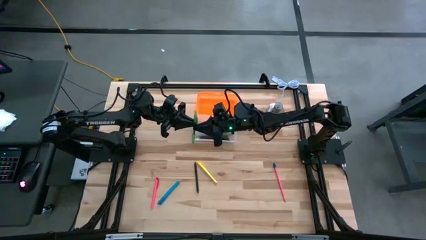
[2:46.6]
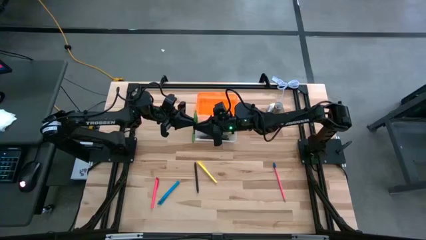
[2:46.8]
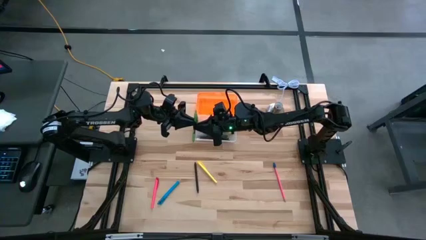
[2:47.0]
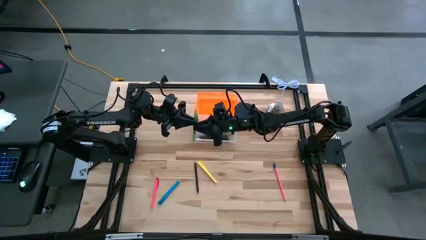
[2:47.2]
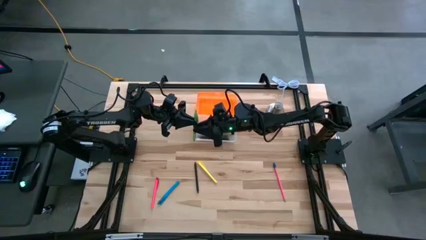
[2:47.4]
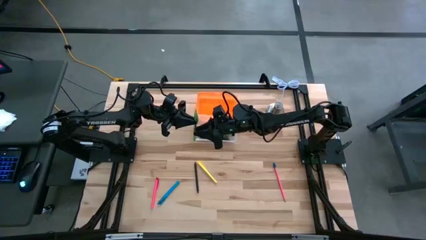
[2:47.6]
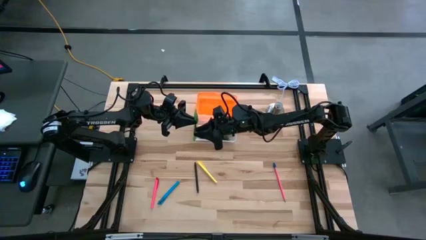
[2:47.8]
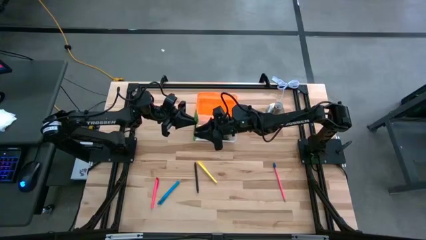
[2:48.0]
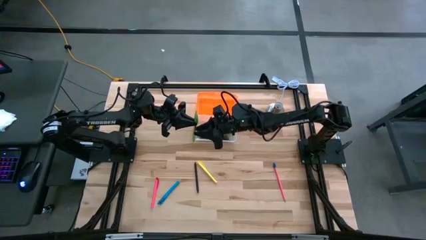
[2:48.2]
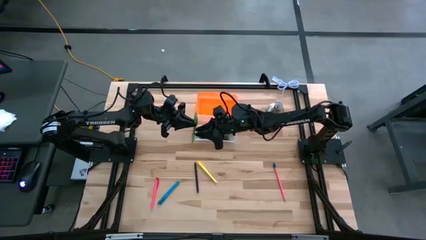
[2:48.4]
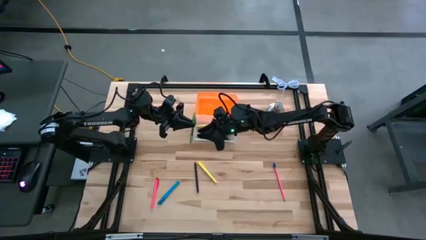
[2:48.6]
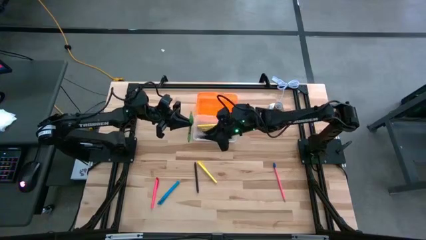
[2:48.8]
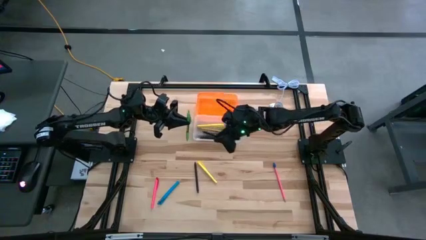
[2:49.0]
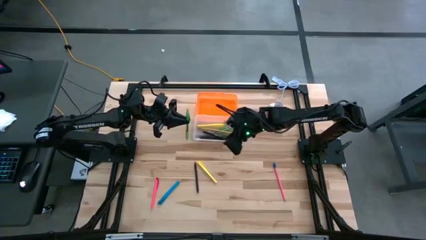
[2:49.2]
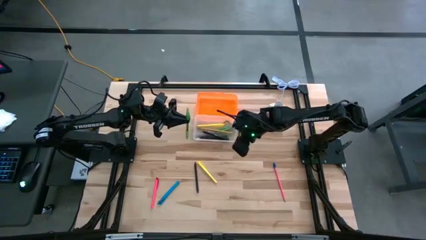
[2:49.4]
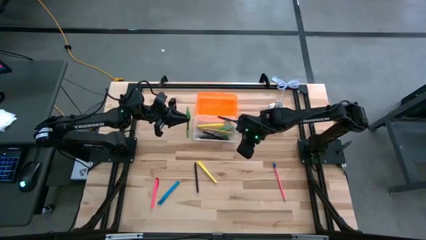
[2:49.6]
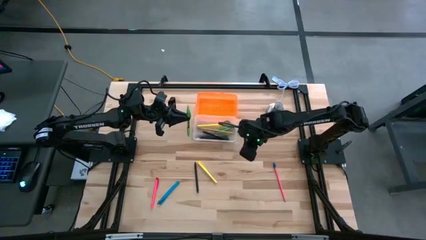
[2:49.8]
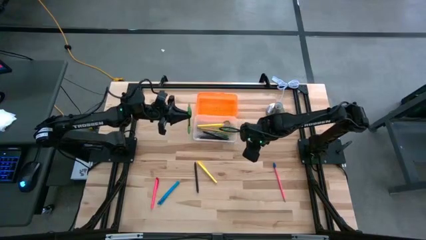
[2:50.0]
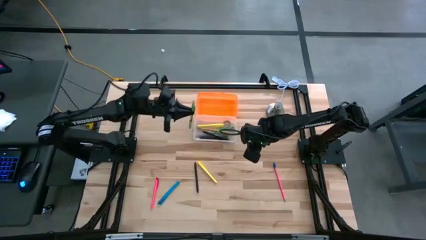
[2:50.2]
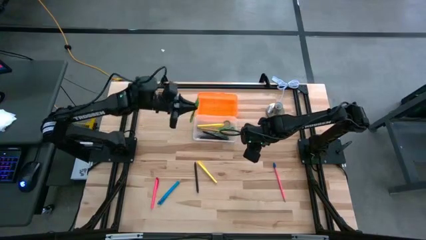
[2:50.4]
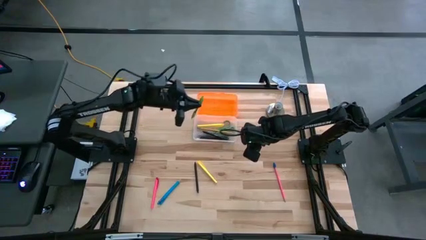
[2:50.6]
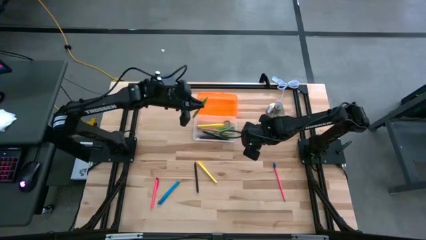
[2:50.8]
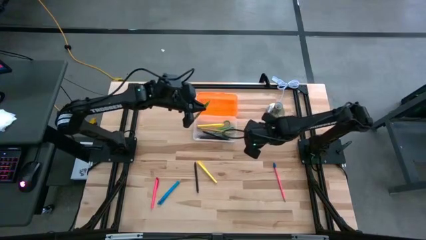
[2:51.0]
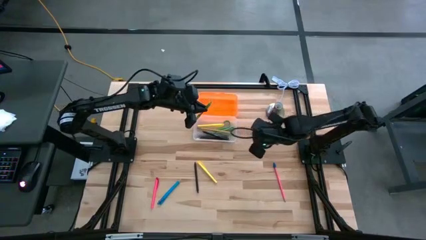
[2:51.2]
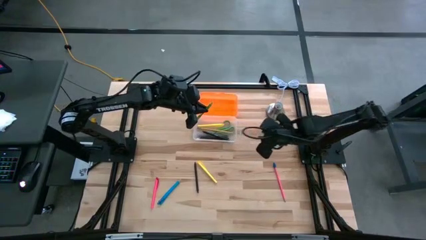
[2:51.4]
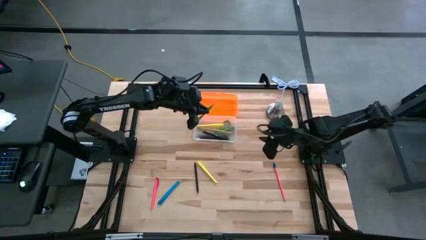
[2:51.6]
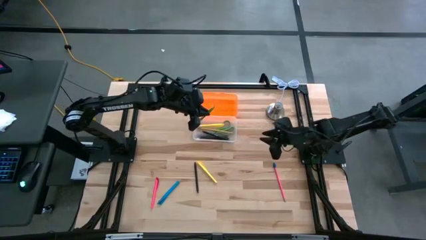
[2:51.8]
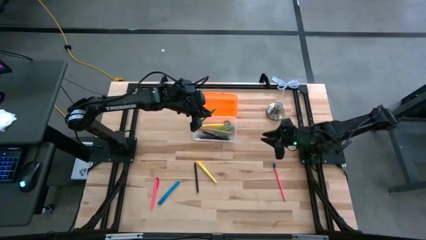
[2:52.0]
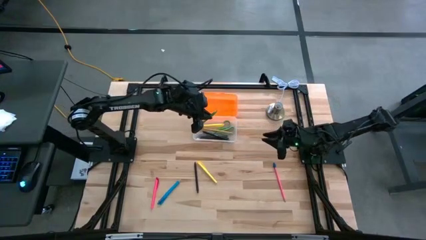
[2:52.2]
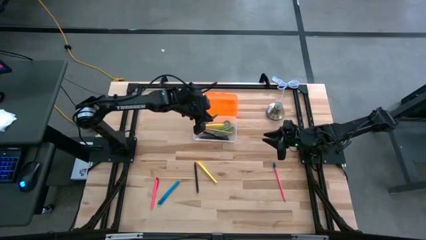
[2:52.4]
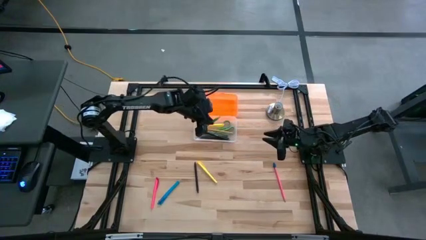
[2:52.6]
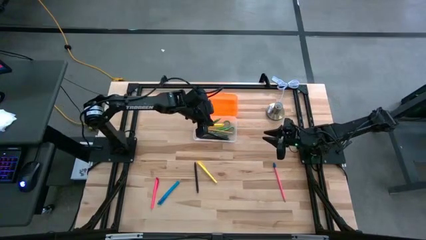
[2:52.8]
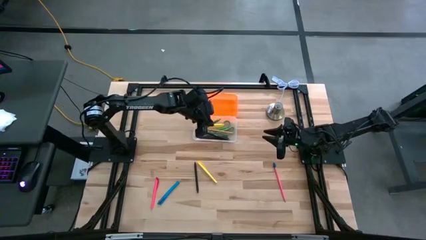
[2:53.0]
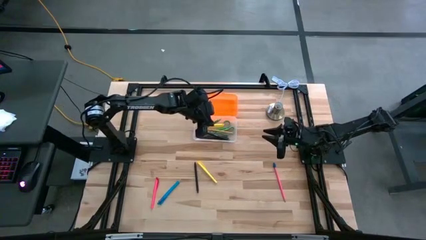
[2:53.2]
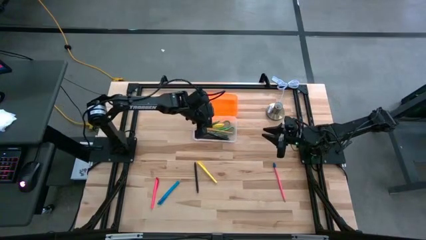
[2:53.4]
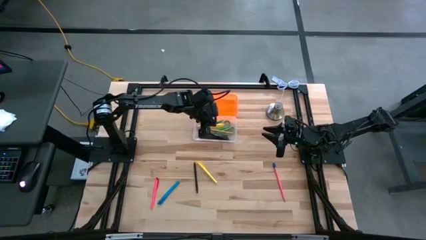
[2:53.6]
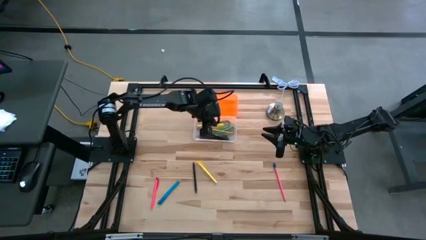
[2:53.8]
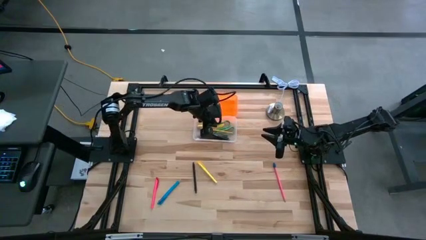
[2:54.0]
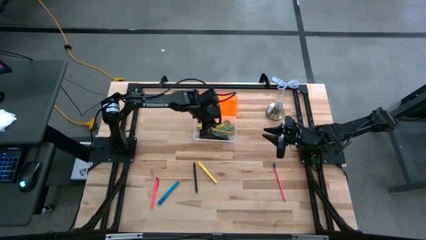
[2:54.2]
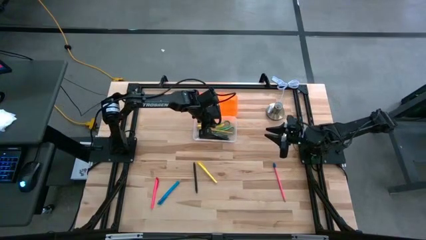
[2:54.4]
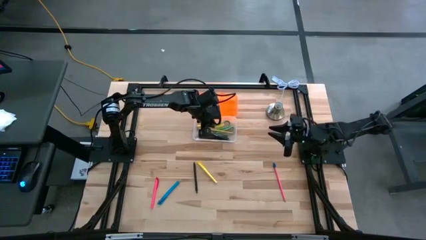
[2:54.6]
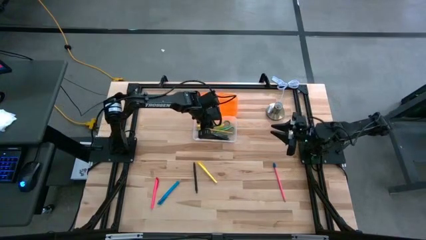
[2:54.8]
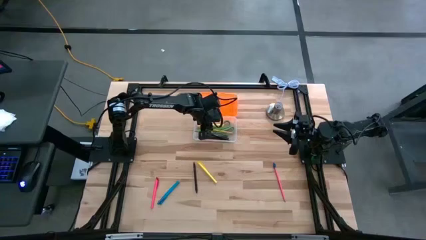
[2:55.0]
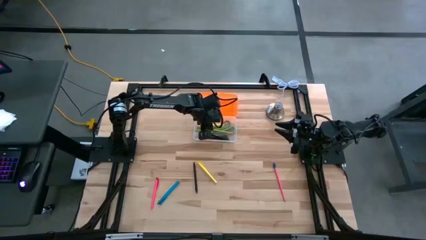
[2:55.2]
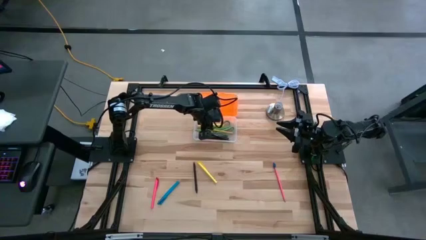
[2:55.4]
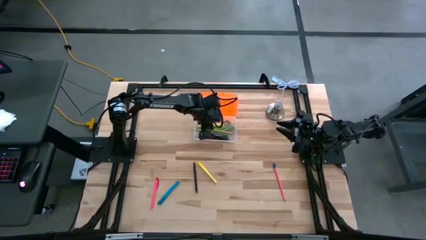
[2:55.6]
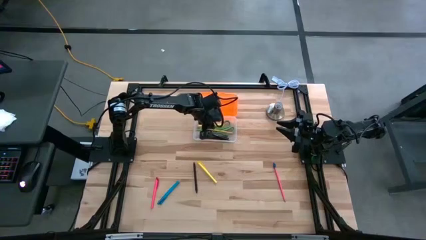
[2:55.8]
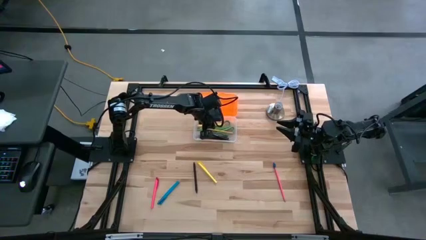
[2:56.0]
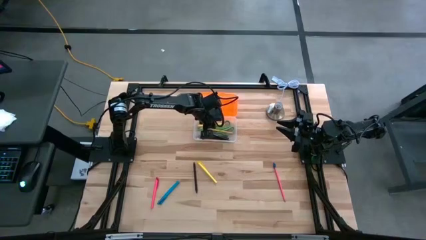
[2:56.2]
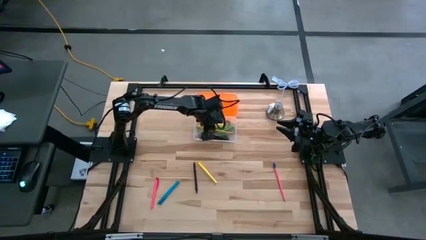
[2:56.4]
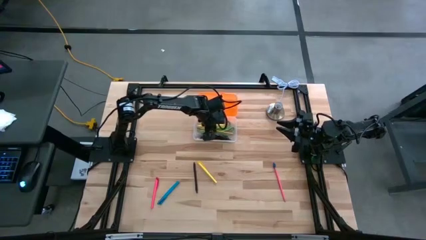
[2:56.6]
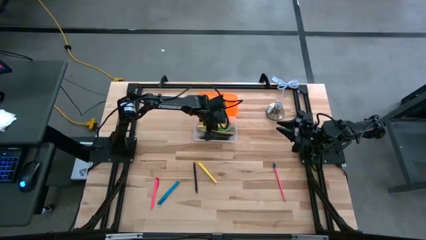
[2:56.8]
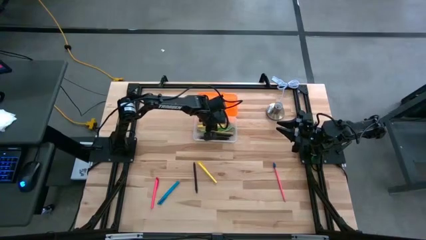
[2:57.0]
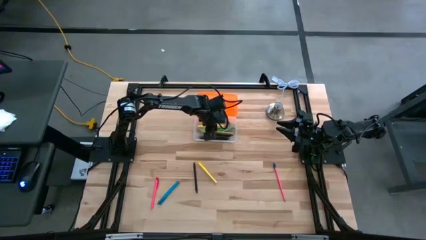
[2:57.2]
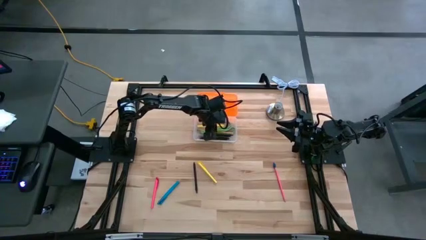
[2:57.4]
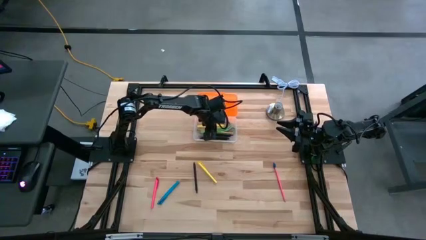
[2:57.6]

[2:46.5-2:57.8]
Task: Pick & place school supplies into a supply box
Put the green pen into the orange supply box

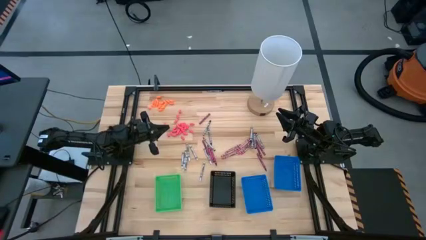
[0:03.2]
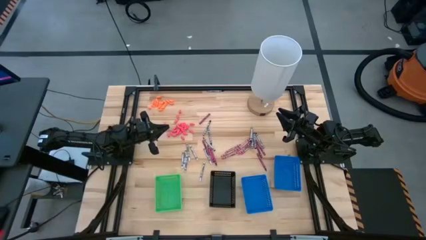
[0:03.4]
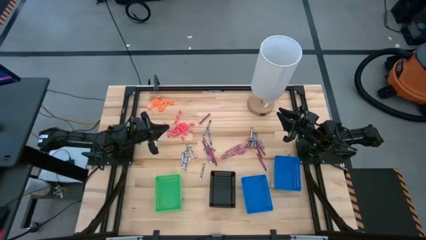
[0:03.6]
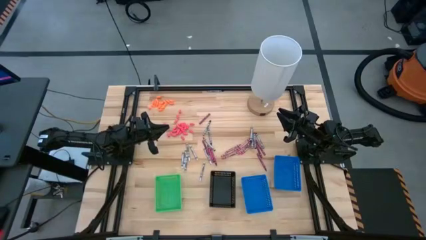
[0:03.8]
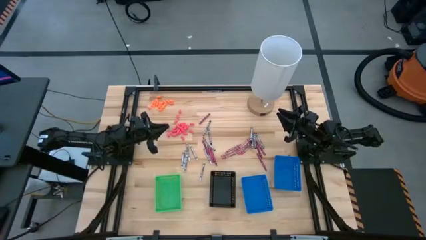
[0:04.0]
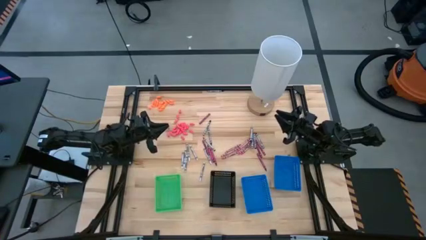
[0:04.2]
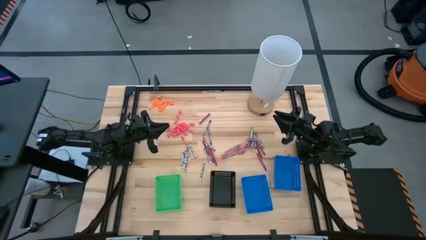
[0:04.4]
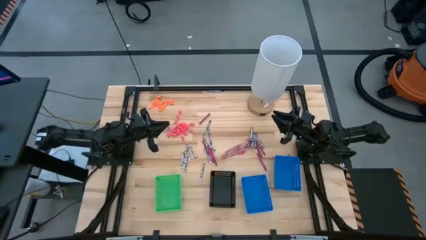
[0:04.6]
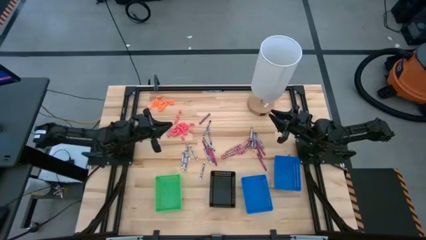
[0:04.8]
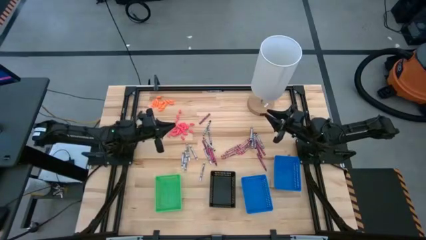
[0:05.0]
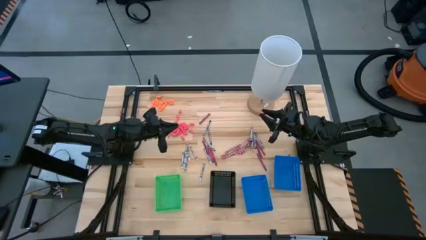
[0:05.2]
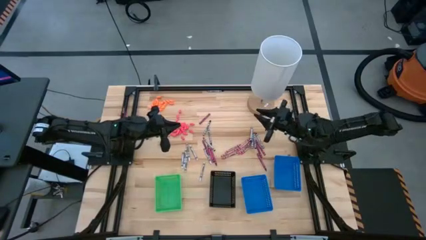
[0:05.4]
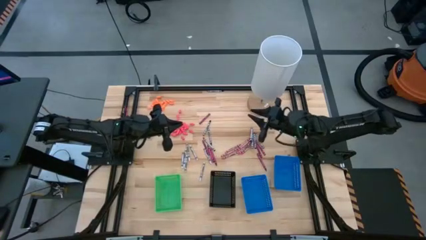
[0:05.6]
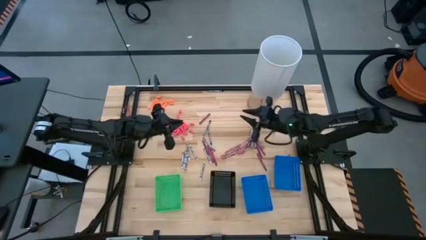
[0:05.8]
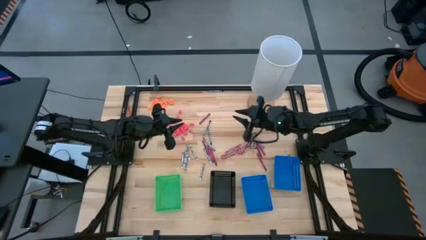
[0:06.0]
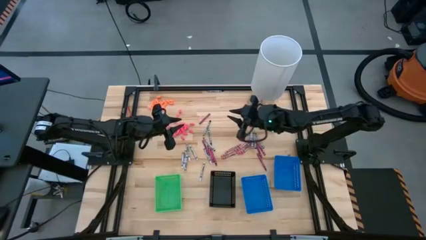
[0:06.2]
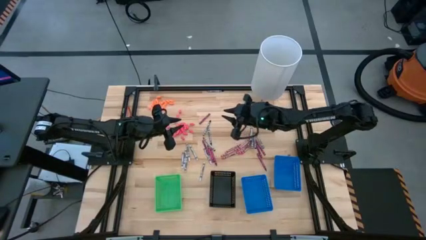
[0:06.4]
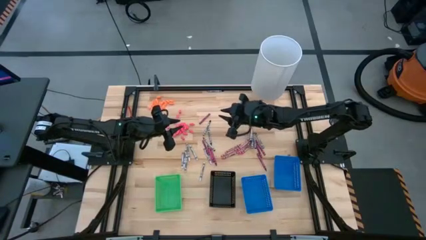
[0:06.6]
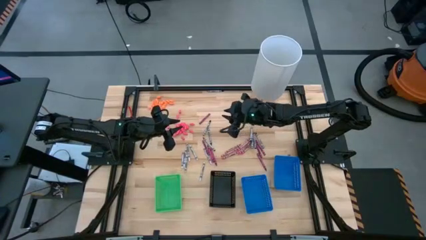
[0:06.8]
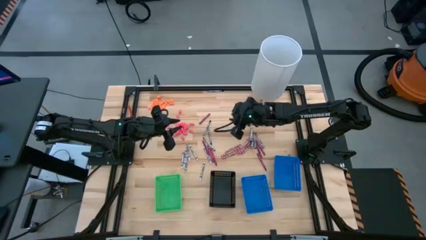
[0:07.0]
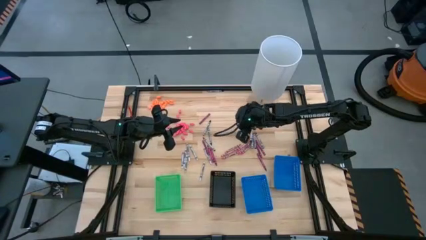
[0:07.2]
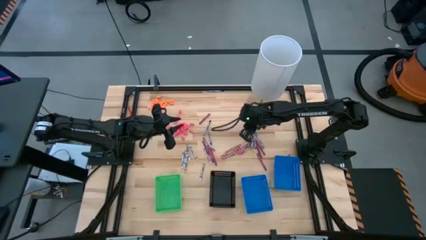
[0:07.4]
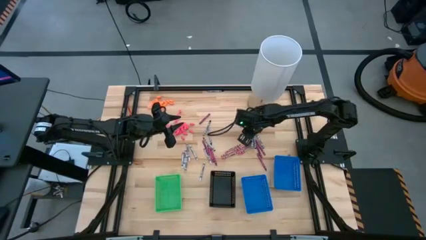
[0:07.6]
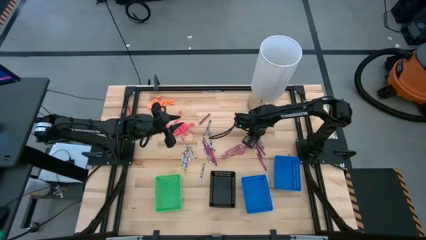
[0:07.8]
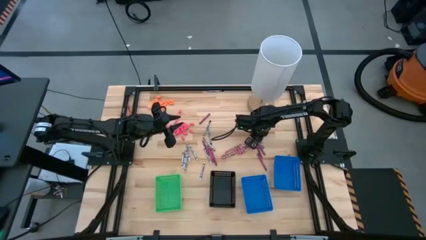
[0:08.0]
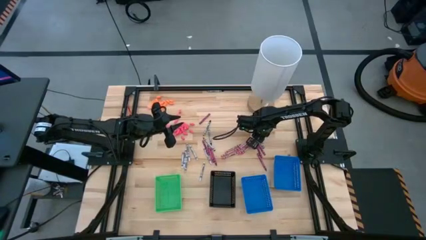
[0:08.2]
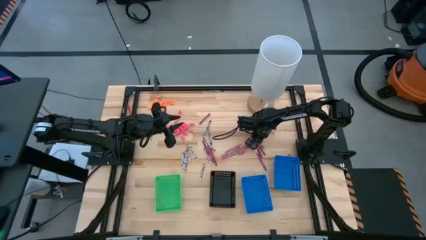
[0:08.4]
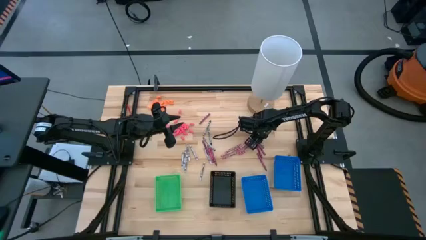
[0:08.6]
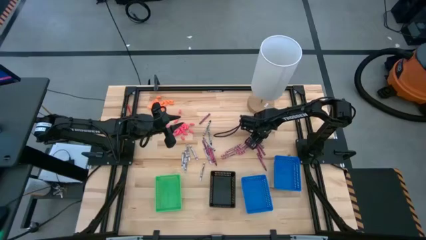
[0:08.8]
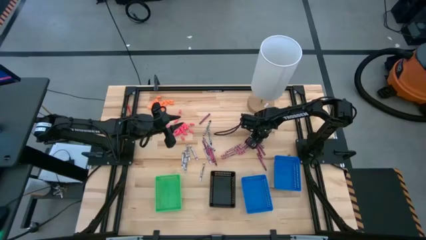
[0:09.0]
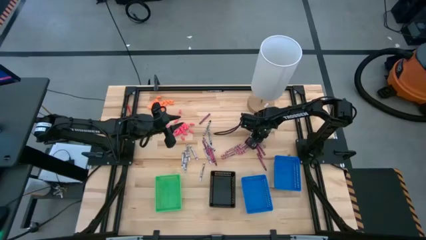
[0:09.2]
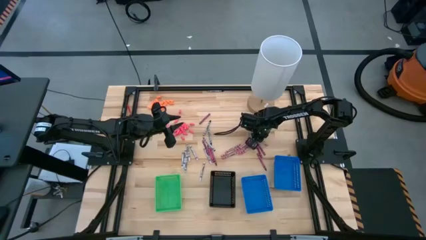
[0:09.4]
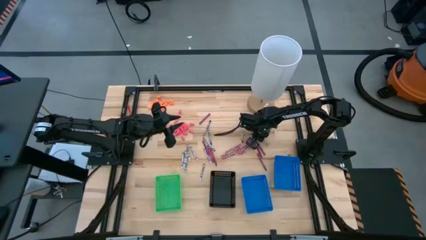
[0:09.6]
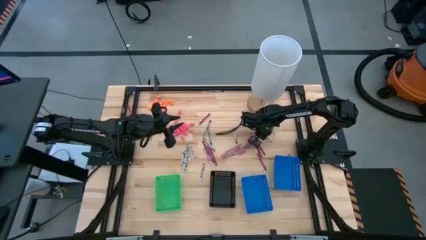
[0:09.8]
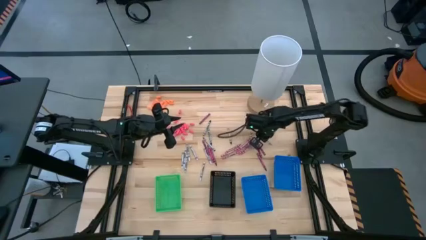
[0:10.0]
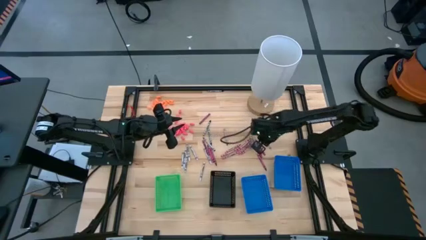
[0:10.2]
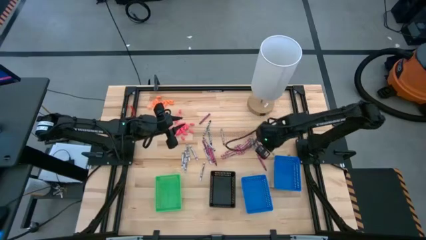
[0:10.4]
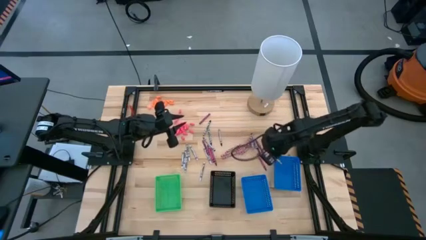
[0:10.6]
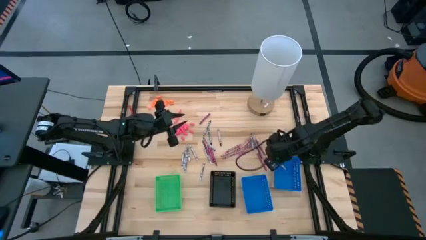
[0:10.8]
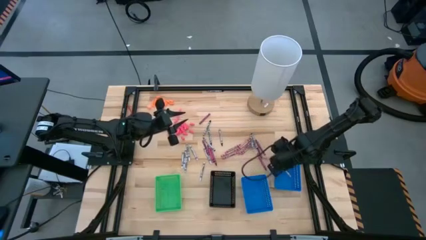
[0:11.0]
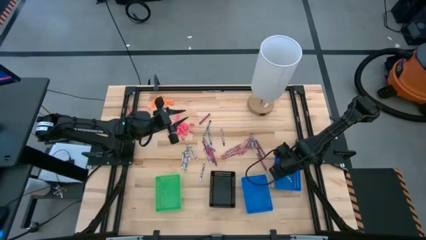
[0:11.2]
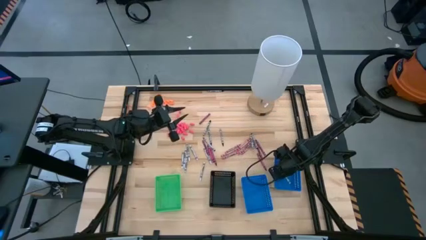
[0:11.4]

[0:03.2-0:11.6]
Task: Sort crayons
Put the black crayon into the right blue bin
